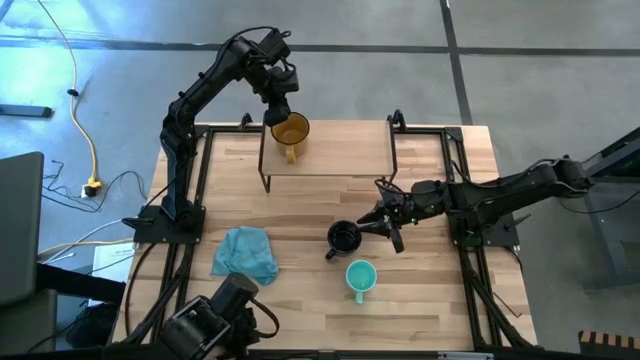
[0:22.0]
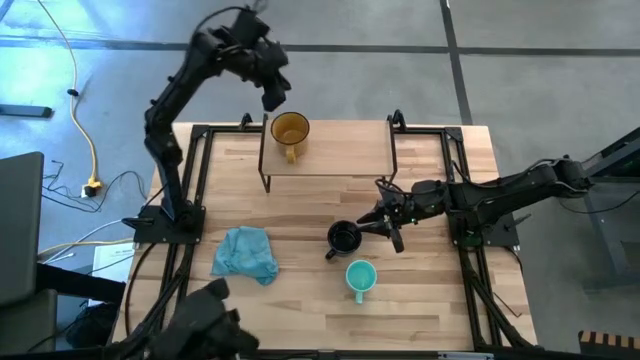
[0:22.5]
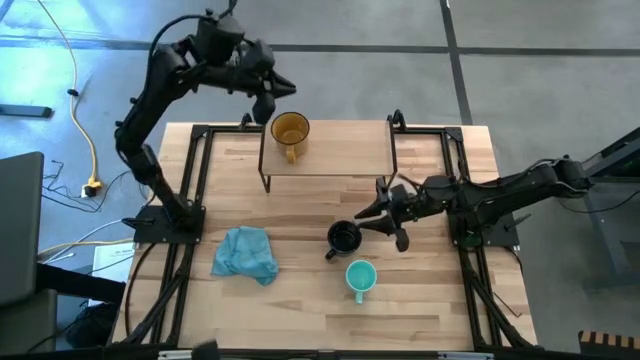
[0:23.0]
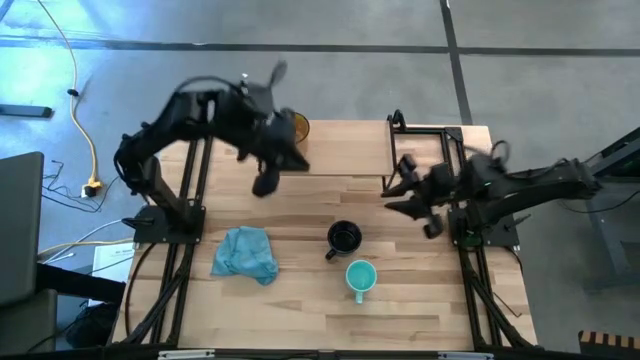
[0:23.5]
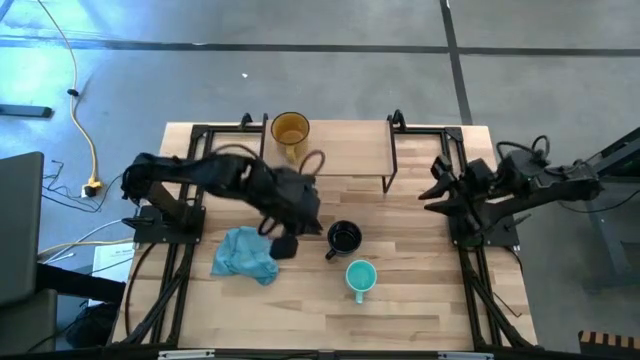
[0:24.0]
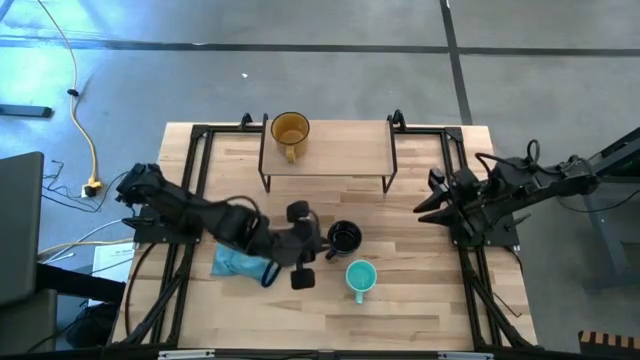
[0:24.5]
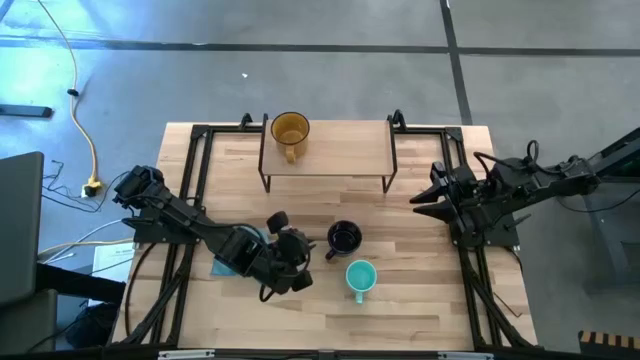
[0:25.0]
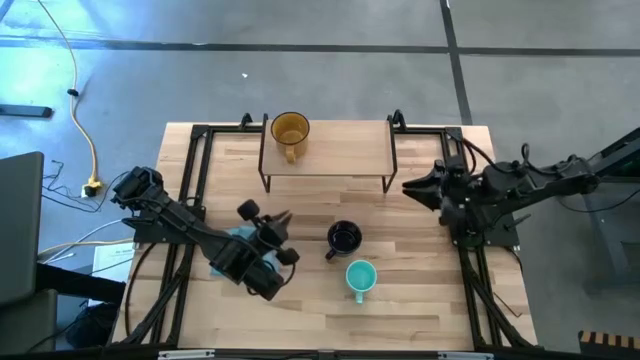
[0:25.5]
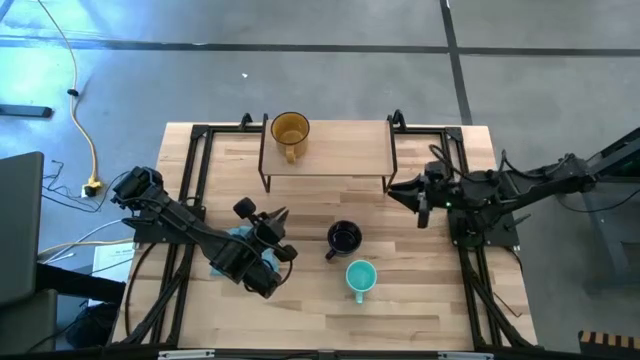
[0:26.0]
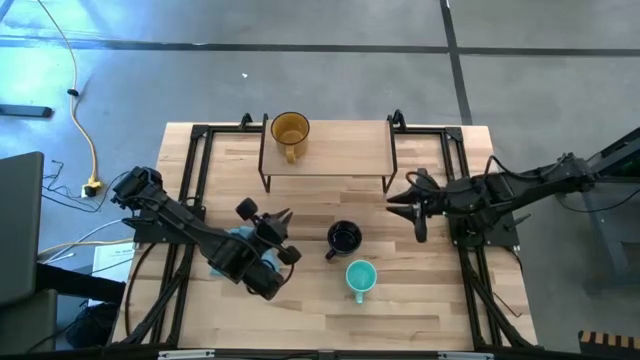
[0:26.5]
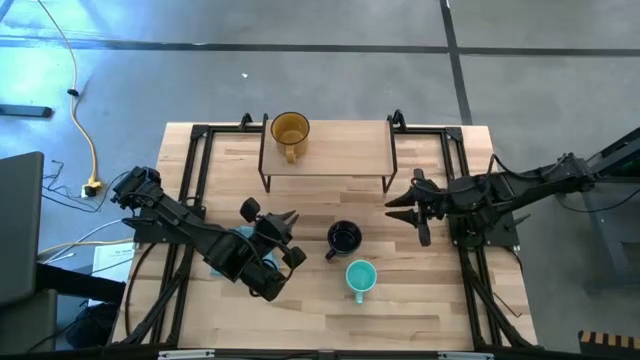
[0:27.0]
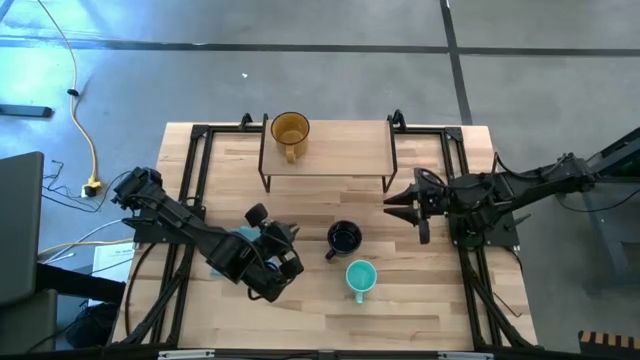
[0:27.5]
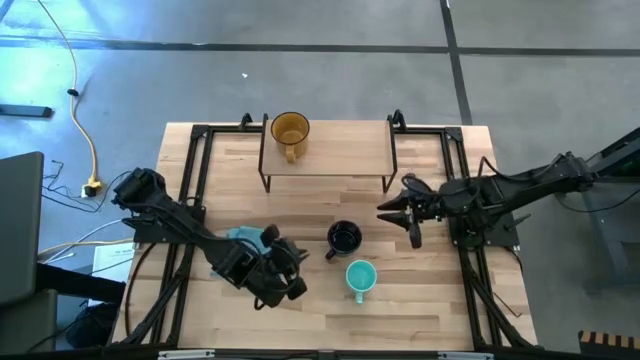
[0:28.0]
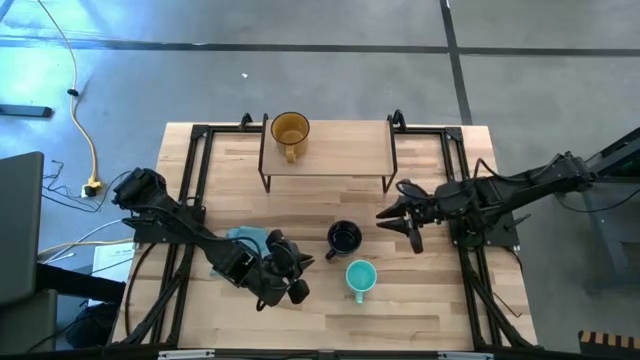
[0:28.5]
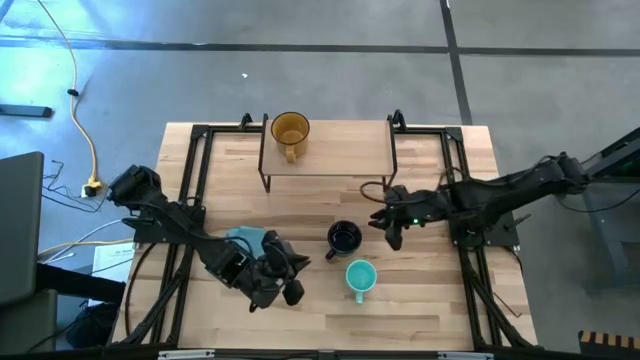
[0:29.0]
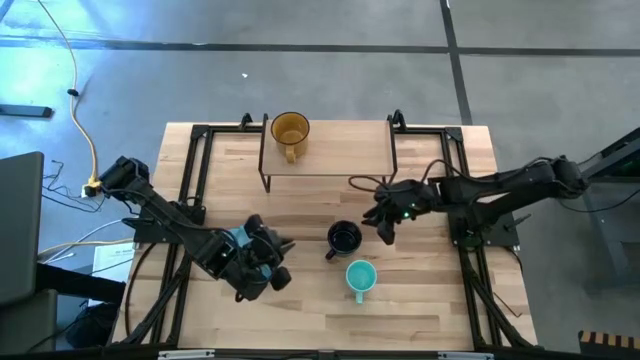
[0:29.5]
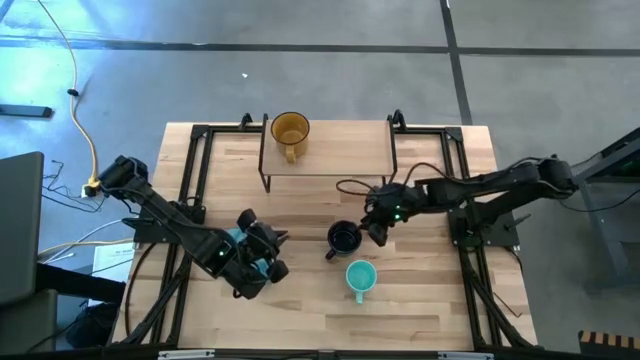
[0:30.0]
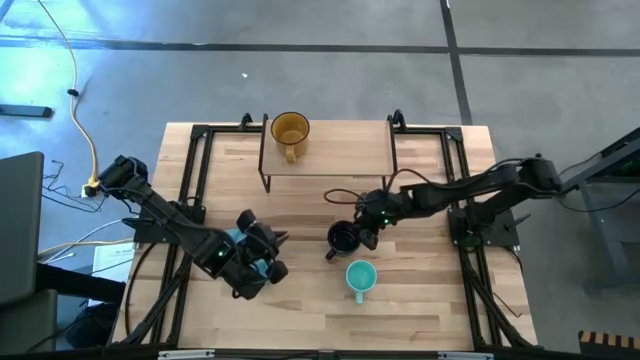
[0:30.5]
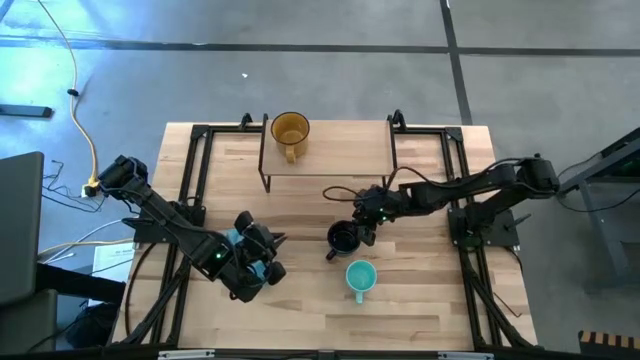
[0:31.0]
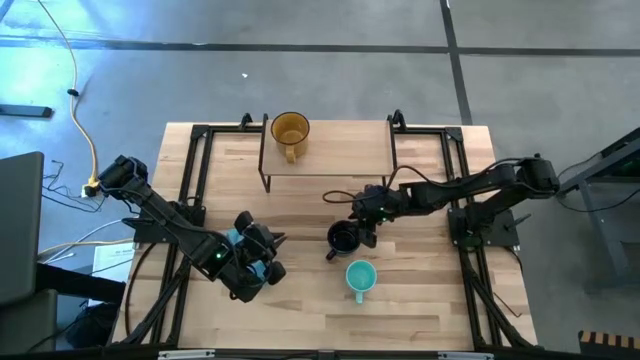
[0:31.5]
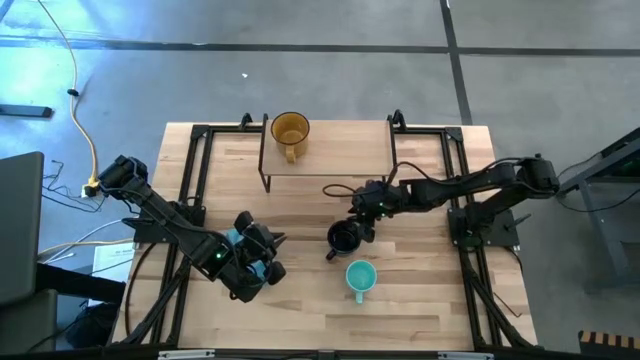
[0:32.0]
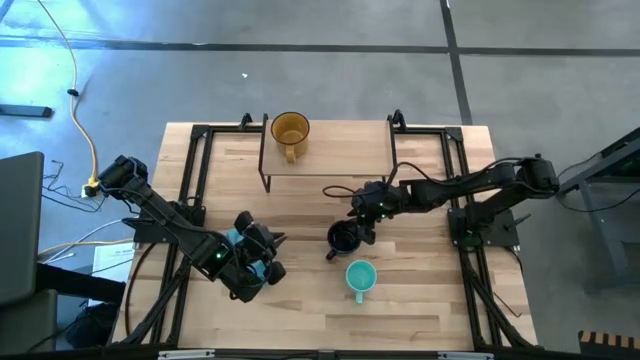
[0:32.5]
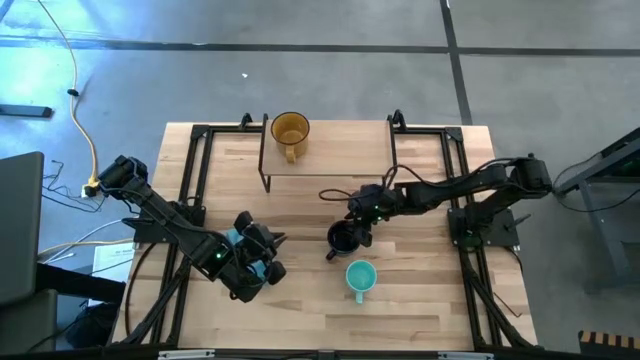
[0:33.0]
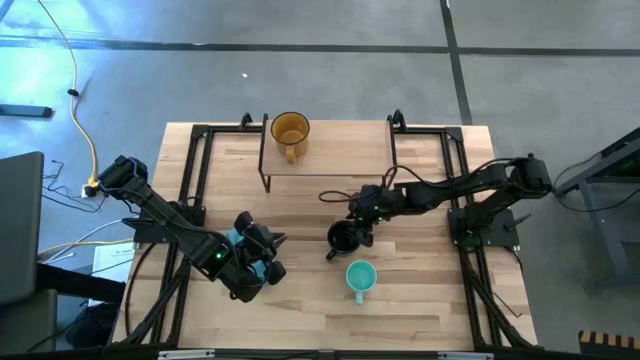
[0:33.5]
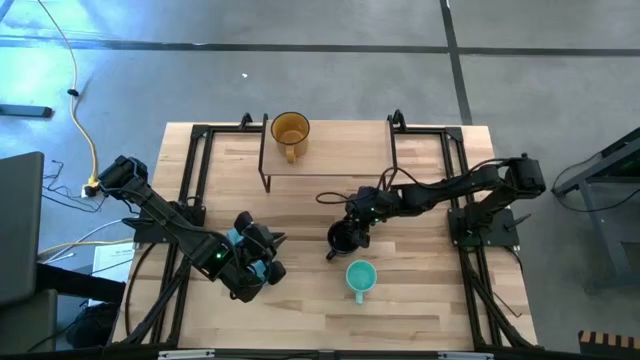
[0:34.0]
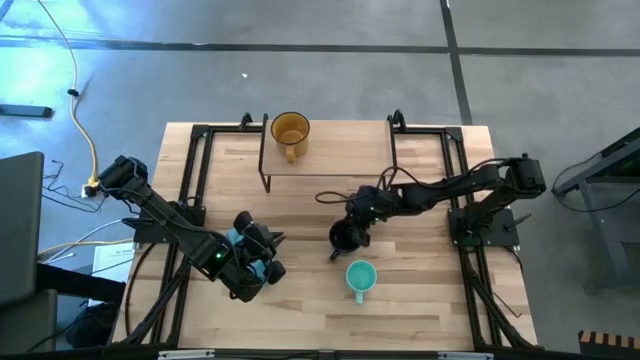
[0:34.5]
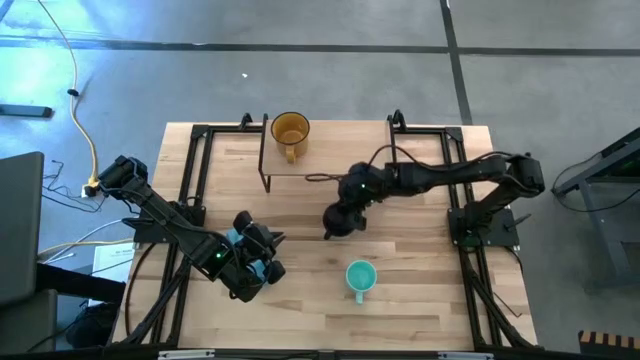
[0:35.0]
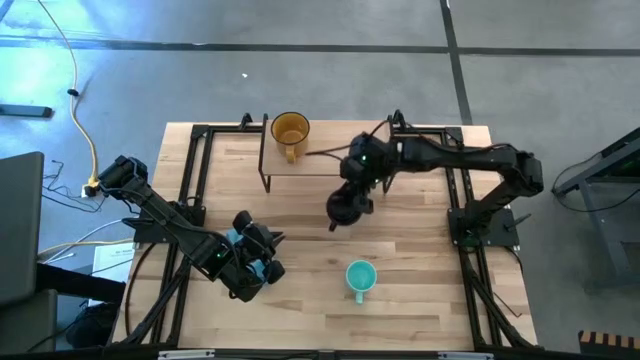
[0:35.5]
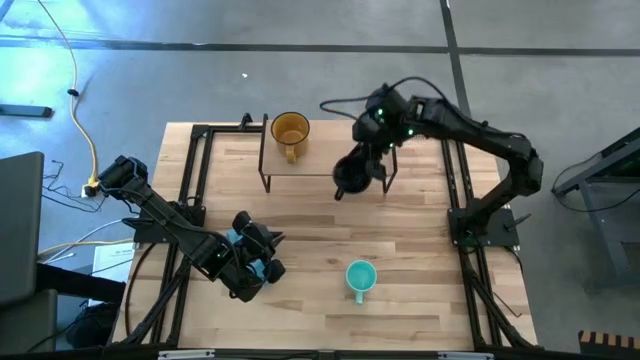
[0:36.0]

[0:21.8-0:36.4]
Task: Stack small to large cups/mugs on shelf
Put the black cup on the shelf

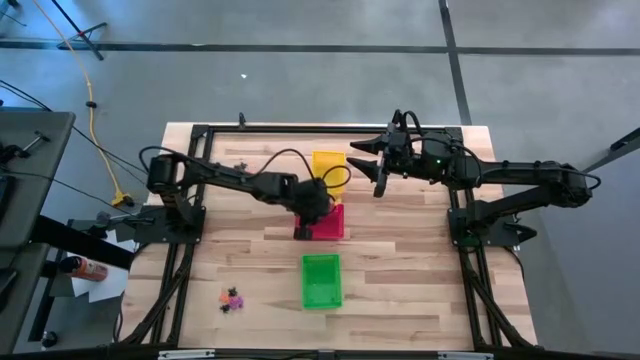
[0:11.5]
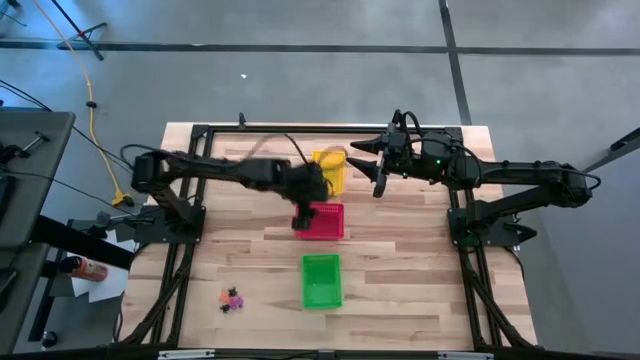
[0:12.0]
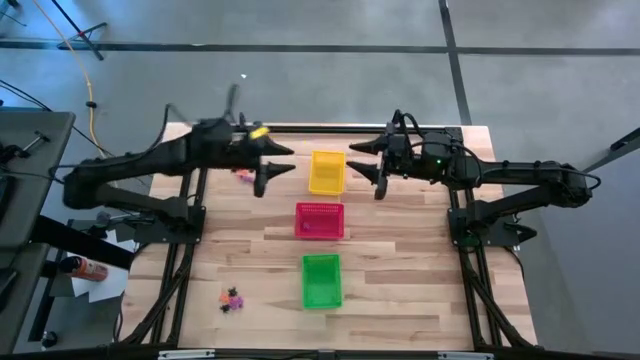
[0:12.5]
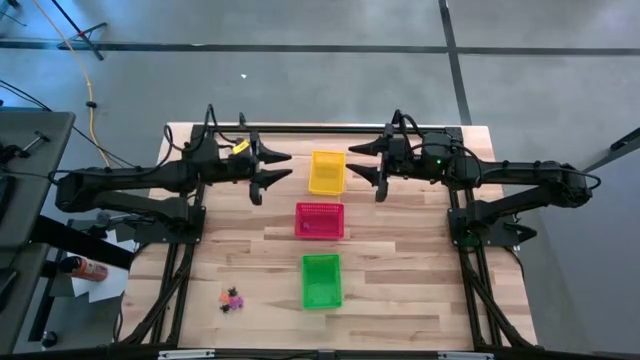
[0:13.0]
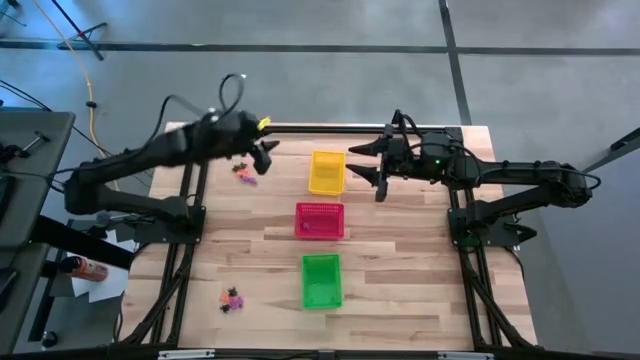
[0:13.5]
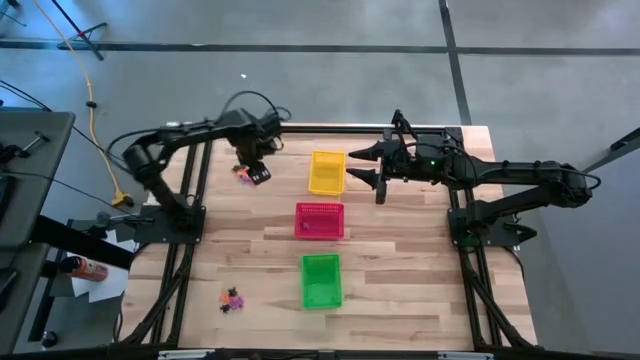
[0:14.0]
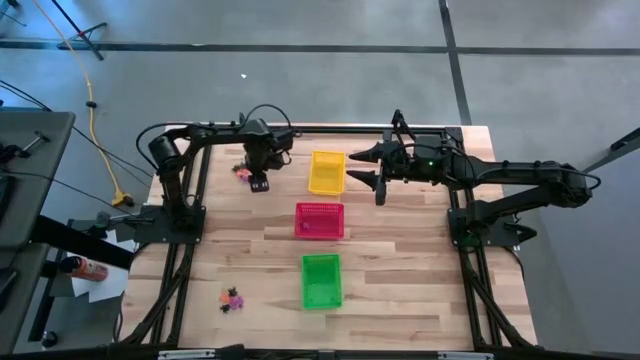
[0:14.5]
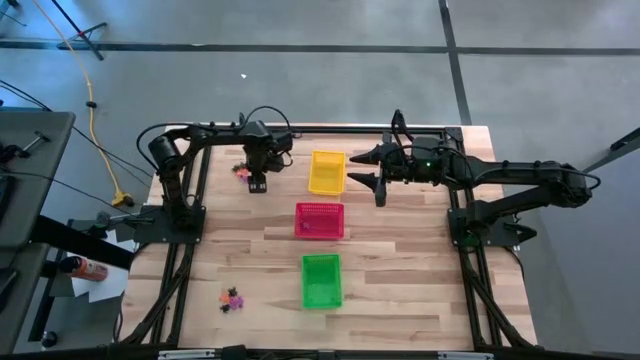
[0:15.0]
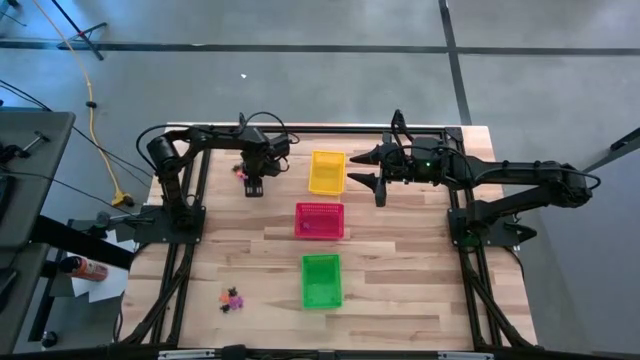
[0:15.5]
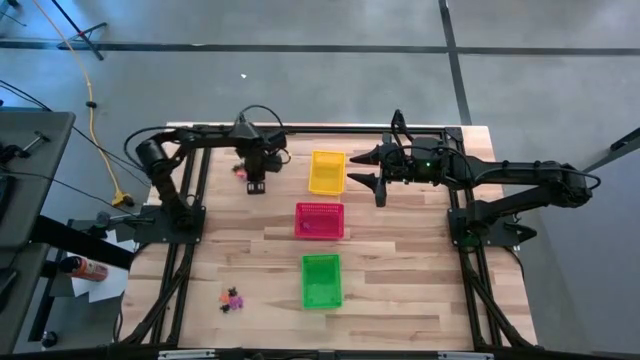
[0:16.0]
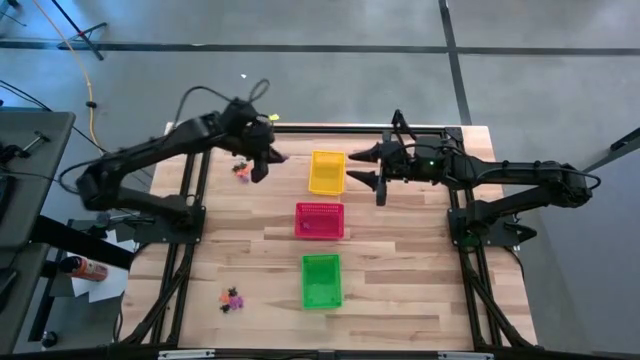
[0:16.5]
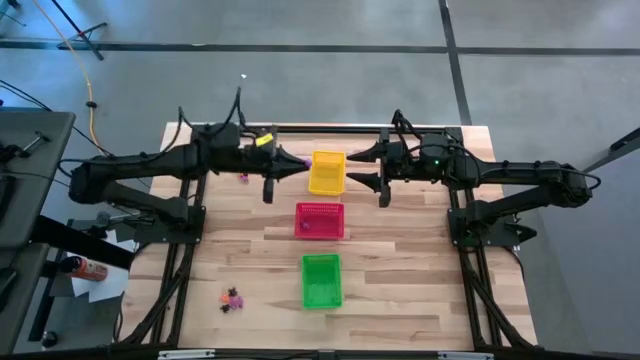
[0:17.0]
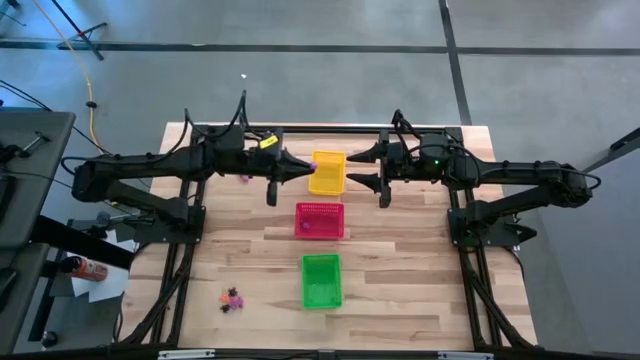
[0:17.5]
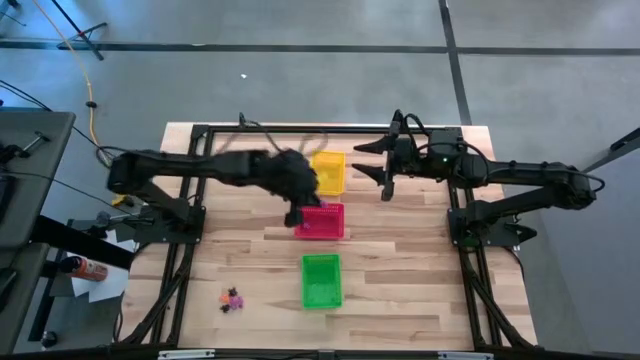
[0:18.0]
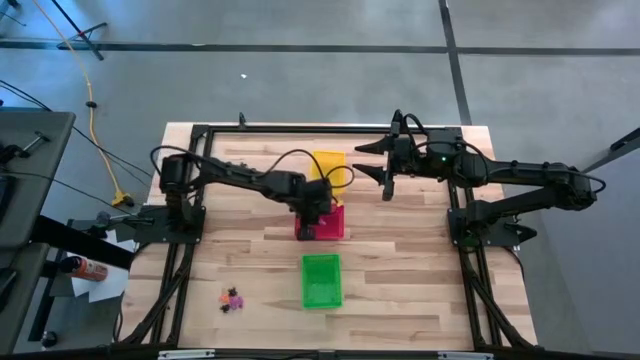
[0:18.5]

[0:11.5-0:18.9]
Task: Sort Halloween decoration
Put the purple skeleton toy into the red bin
